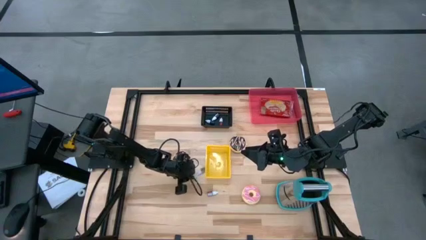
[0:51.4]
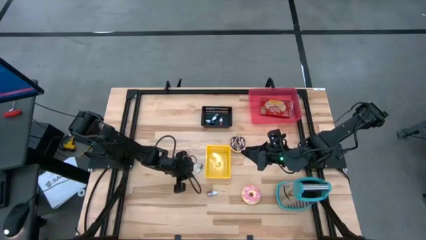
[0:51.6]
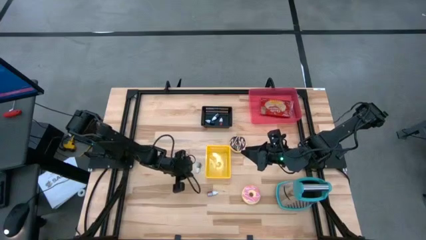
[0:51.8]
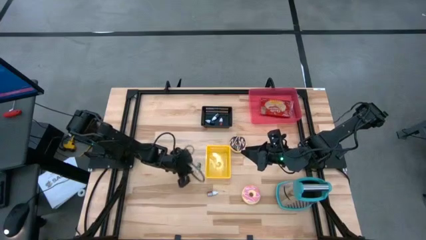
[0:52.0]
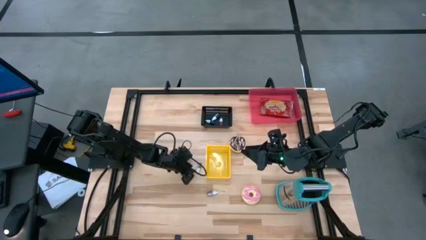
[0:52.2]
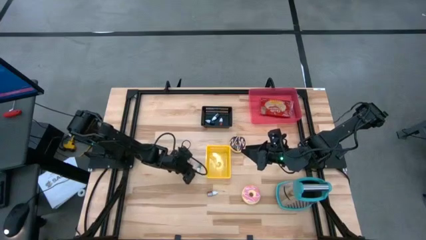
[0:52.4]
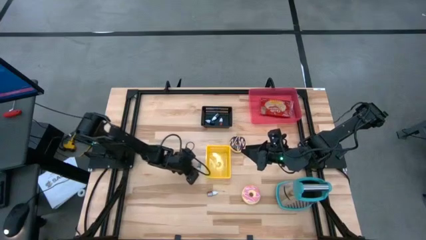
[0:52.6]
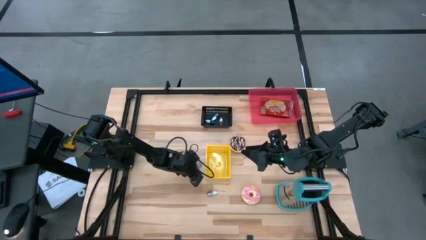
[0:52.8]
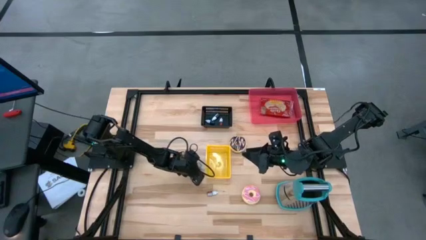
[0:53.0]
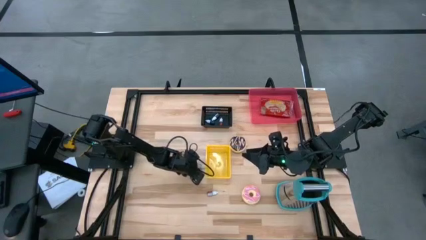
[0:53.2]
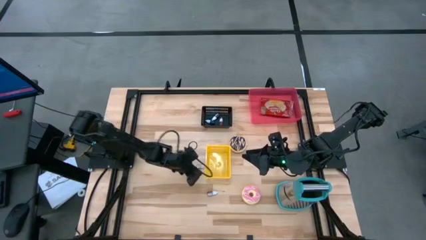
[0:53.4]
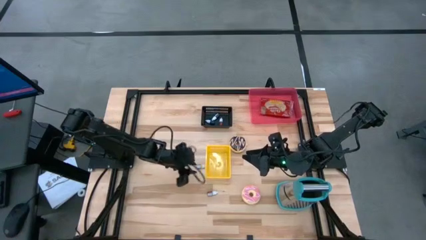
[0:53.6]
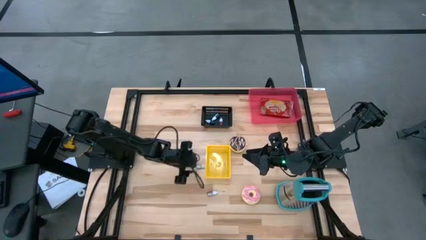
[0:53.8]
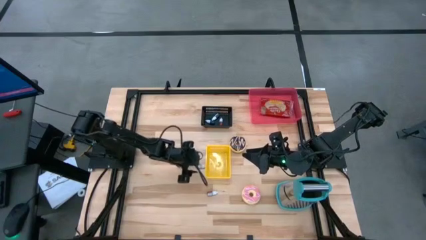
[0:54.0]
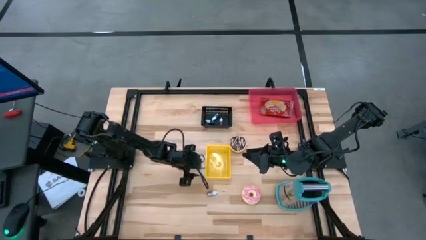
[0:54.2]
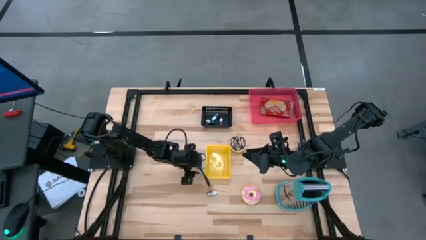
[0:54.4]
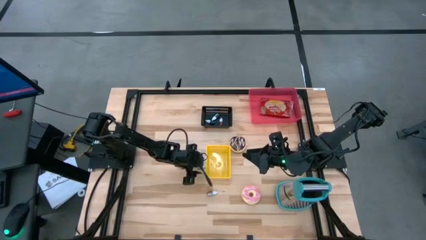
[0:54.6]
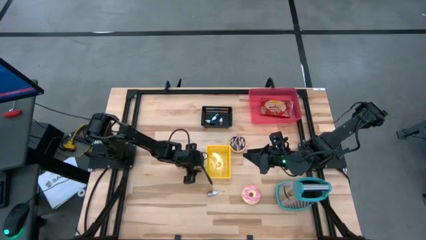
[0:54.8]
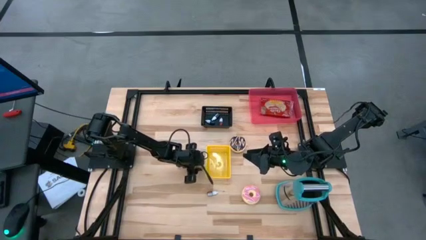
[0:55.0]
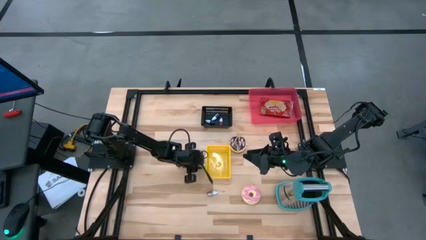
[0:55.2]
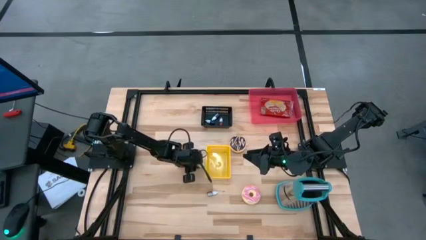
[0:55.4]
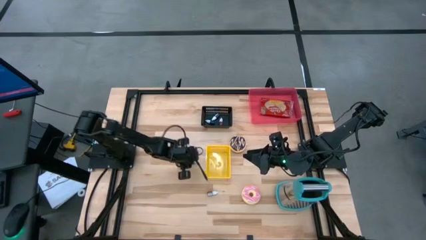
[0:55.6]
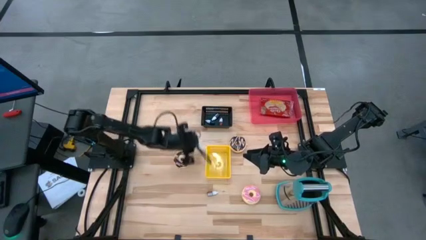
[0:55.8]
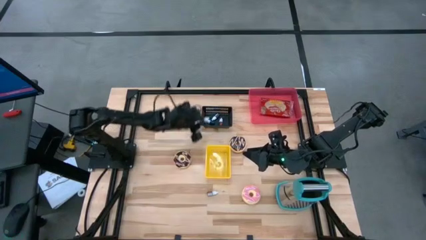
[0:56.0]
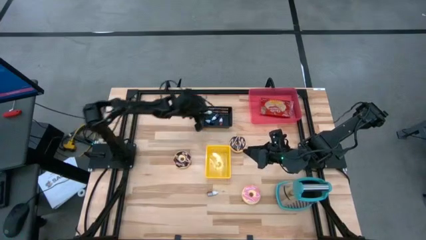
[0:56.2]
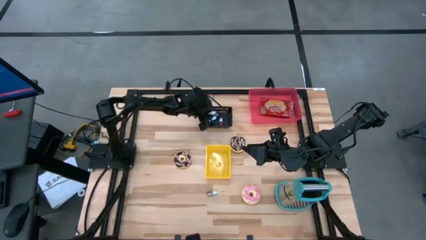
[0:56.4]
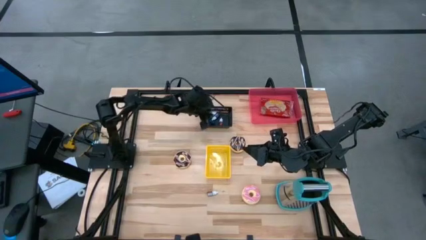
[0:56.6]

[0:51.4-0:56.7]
Put the green food coloring bottle into the black bin

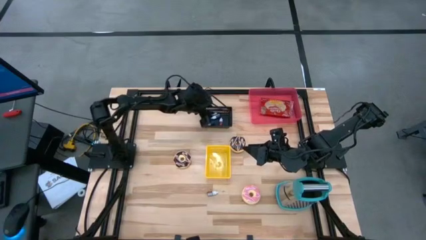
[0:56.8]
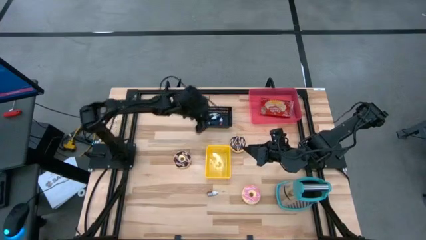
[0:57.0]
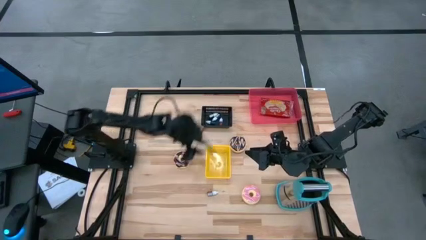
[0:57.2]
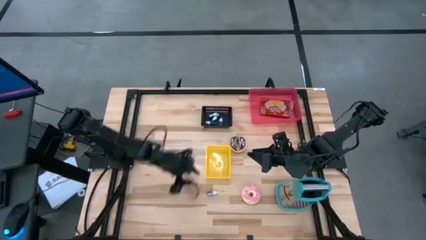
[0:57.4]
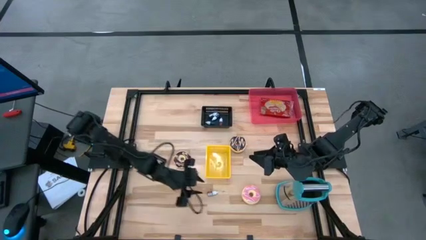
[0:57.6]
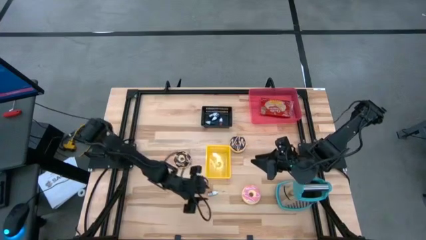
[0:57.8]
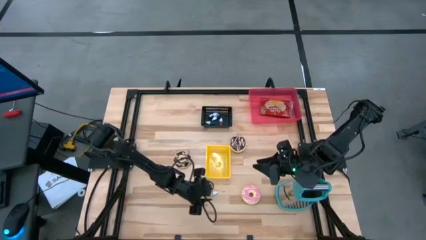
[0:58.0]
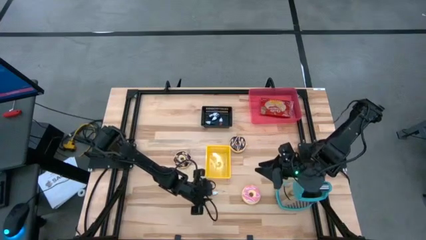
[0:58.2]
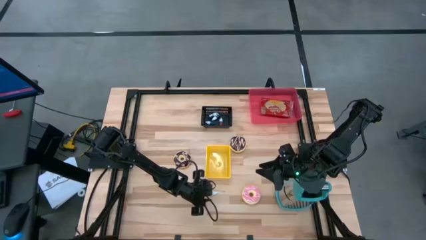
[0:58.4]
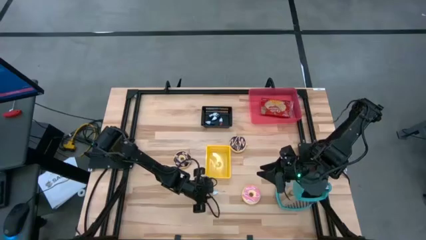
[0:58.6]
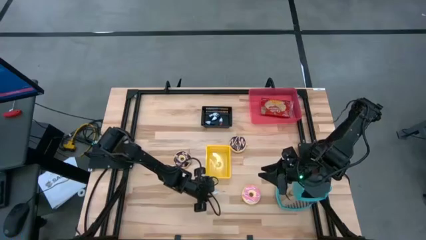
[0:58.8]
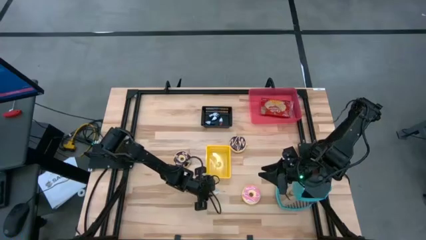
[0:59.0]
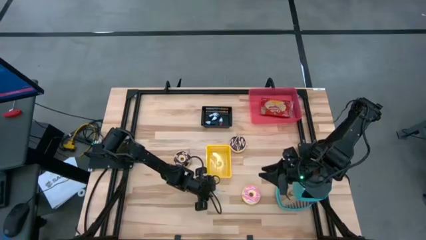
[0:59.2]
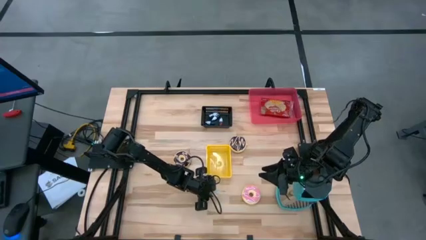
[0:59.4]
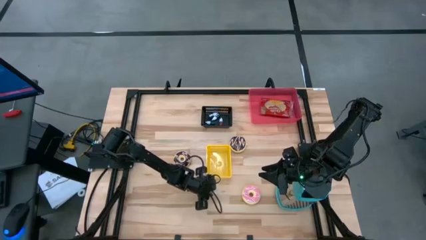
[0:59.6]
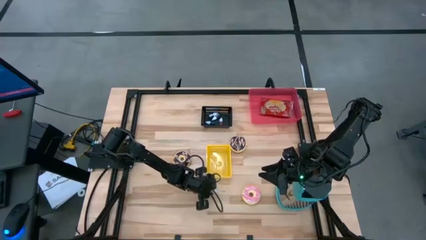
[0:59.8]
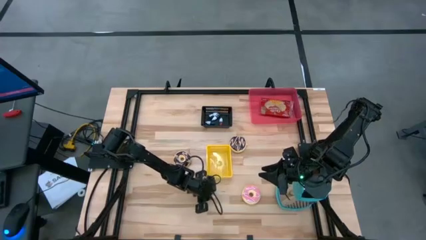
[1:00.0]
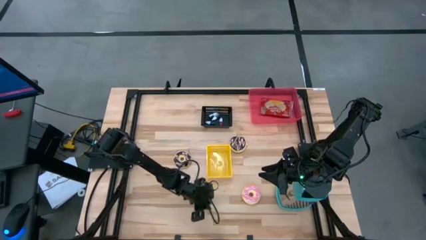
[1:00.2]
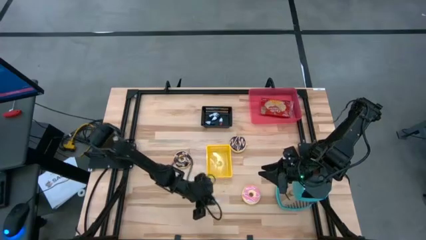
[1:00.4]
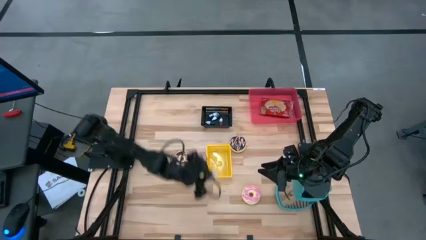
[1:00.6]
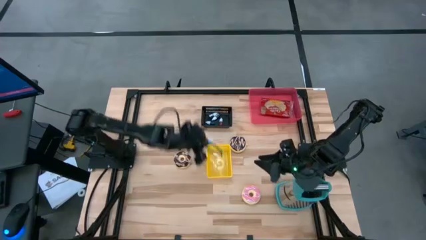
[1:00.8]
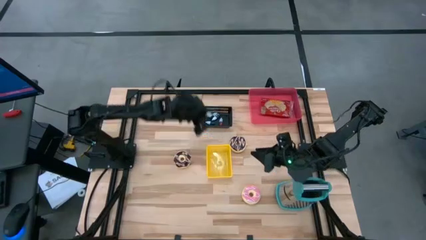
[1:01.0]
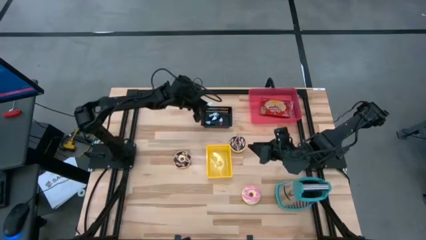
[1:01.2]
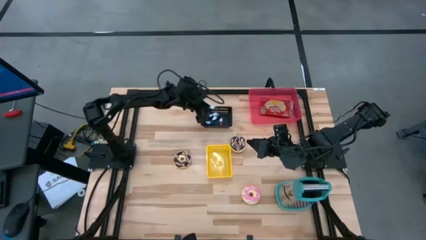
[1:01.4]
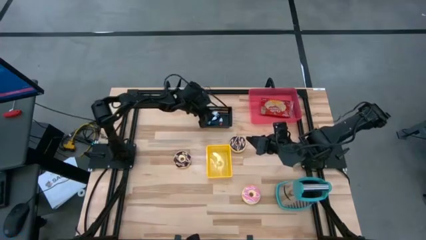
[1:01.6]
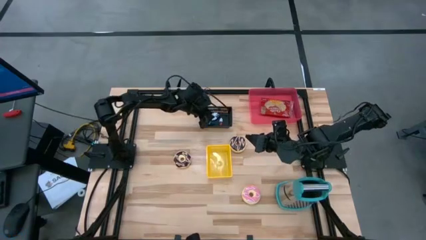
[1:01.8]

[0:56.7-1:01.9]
Put the red food coloring bottle into the black bin

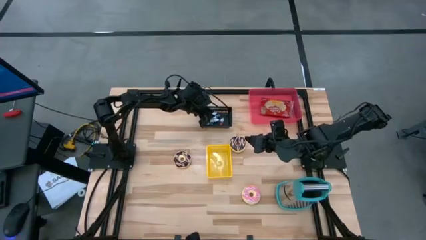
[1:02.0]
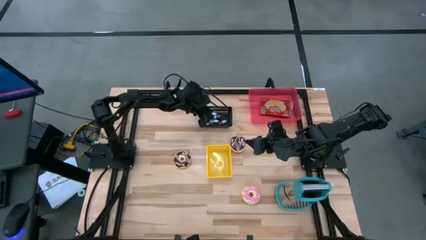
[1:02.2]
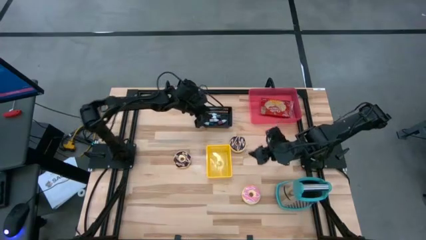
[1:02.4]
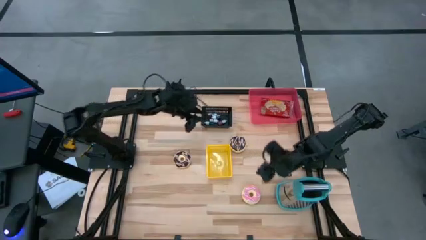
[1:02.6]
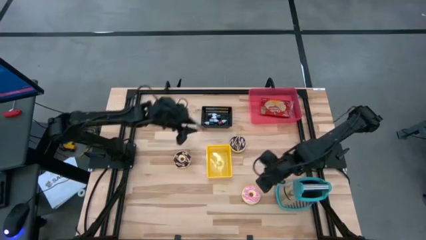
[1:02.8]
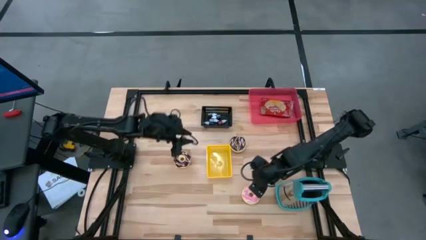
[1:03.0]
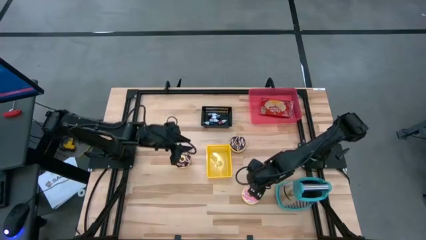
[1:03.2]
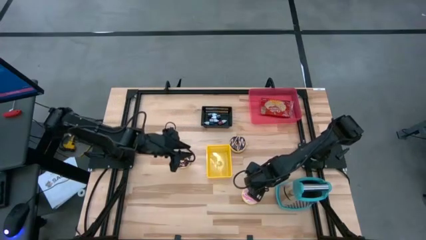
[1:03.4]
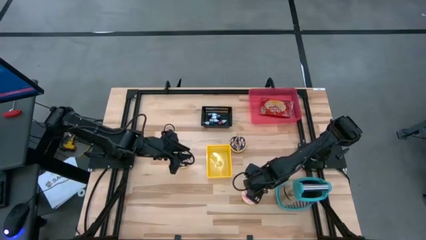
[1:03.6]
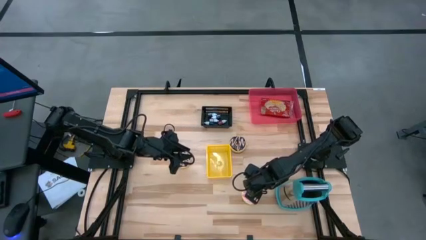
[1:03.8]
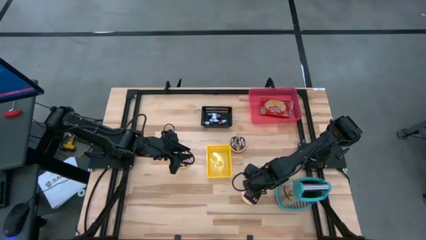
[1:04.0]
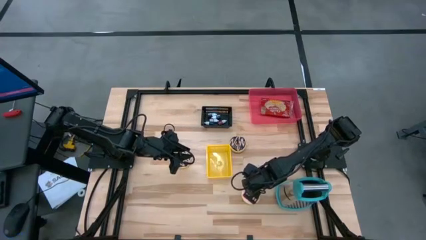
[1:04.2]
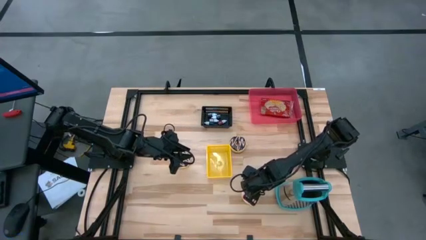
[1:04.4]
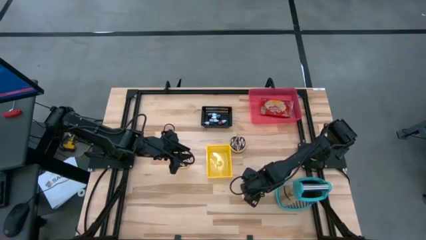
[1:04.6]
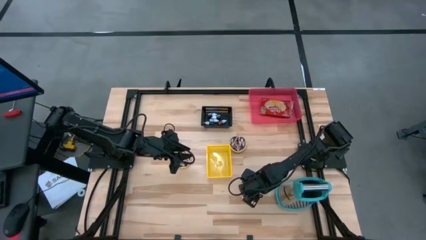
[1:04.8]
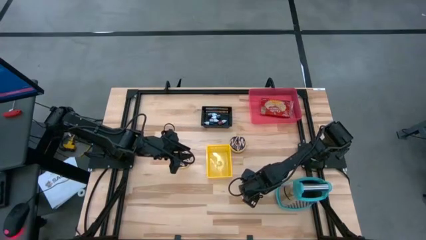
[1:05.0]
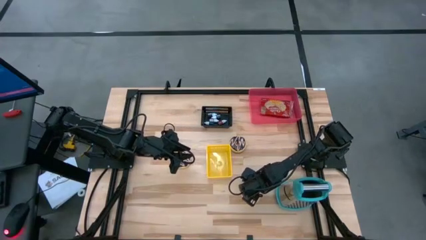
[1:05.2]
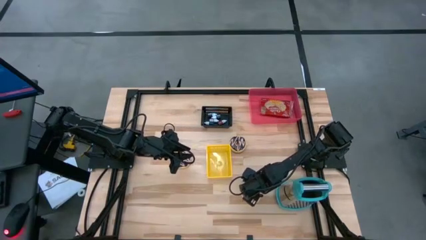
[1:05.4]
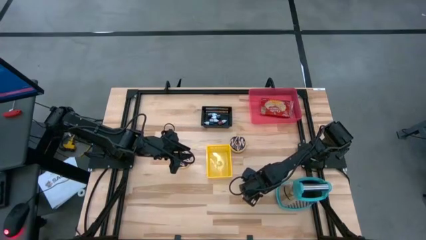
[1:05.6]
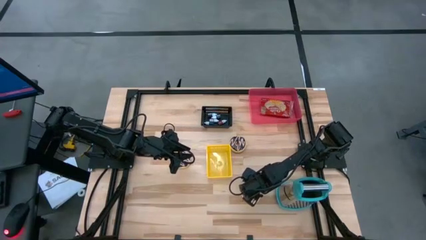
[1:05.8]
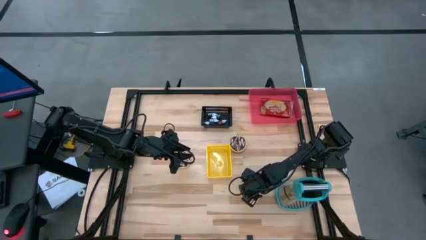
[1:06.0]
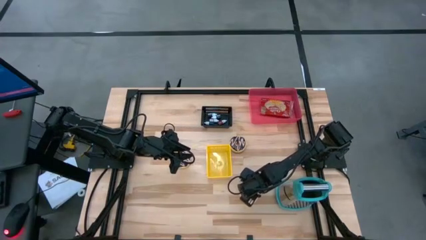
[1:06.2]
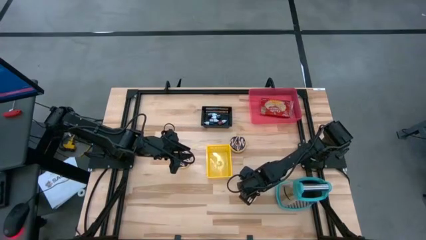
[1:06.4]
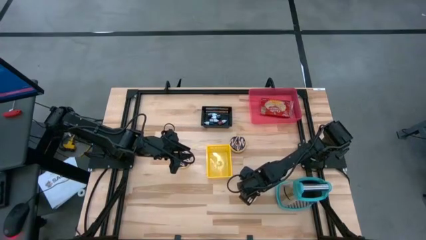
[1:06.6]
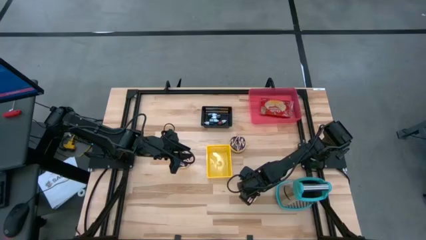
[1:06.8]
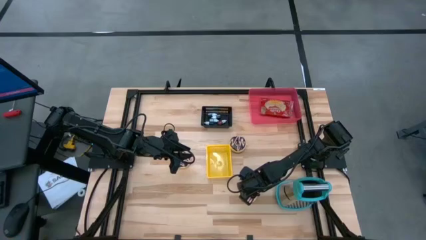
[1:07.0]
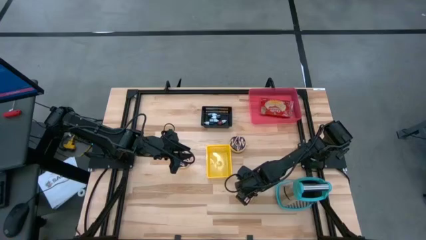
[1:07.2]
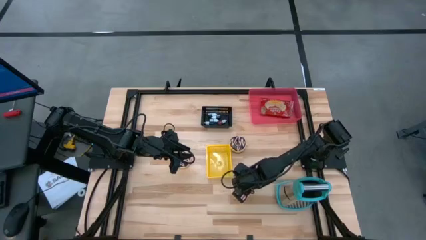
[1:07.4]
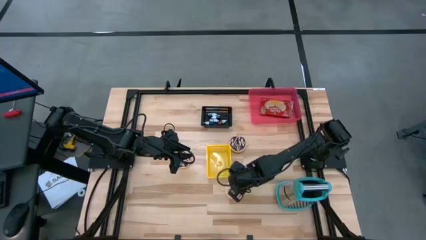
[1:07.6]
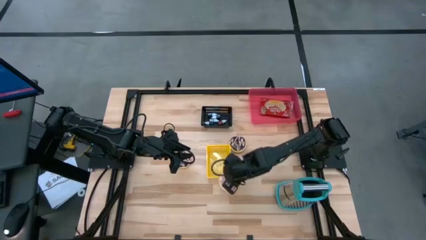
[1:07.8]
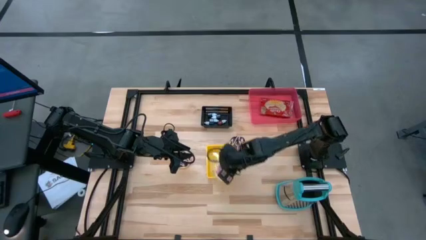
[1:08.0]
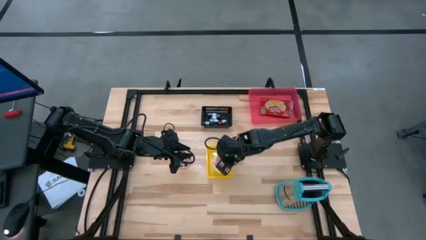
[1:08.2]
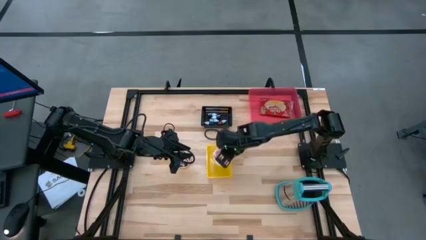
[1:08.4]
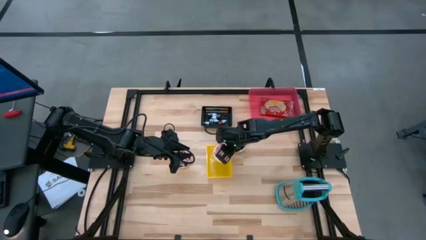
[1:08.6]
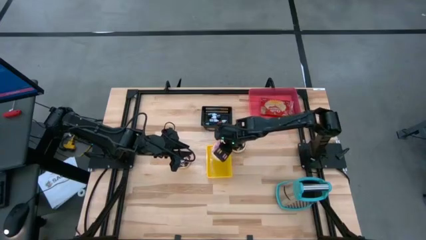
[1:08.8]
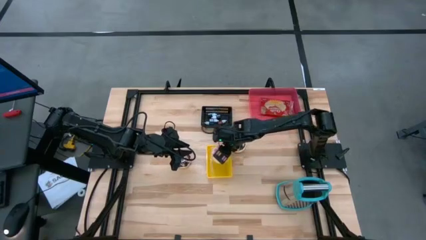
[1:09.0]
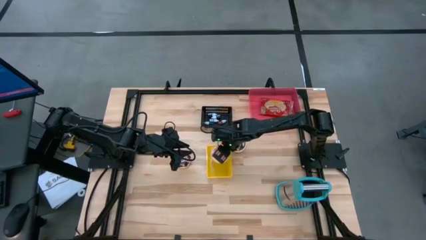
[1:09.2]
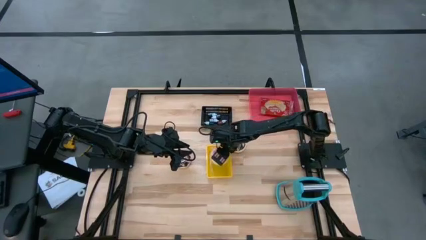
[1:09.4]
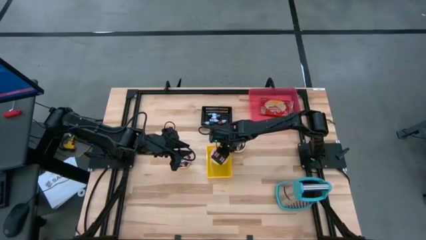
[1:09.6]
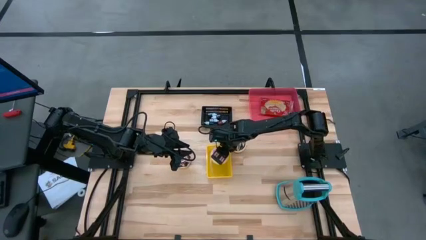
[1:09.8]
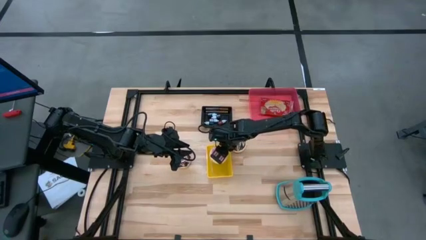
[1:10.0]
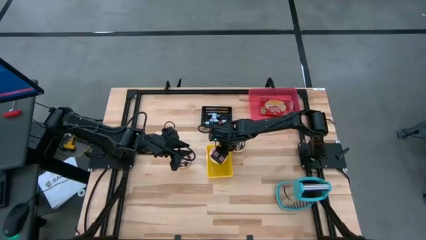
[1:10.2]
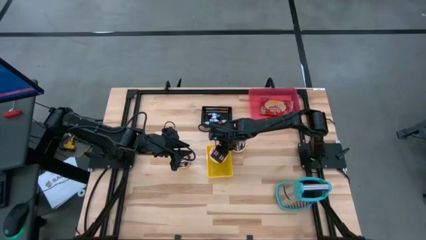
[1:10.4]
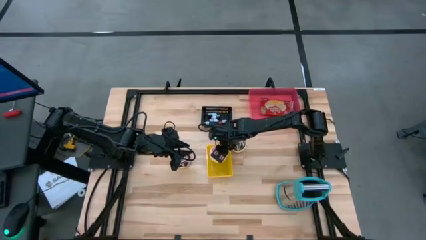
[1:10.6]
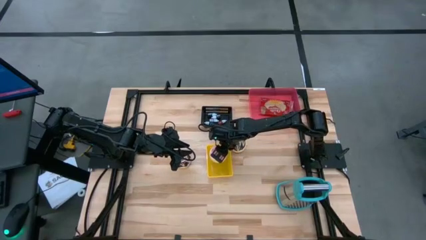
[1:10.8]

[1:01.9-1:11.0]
Put the pink donut into the yellow bin
